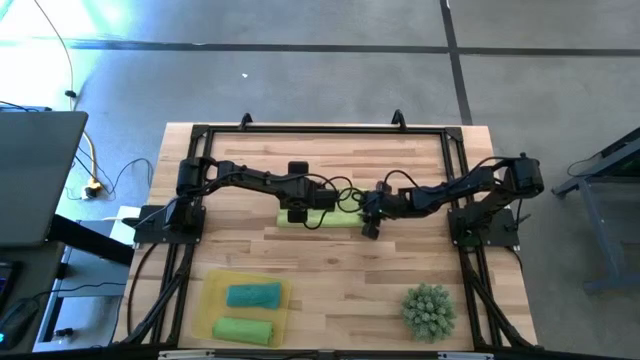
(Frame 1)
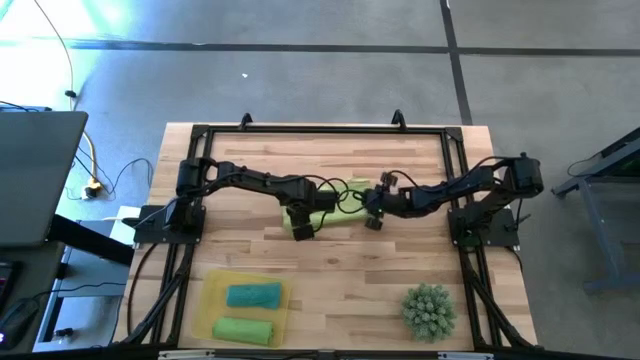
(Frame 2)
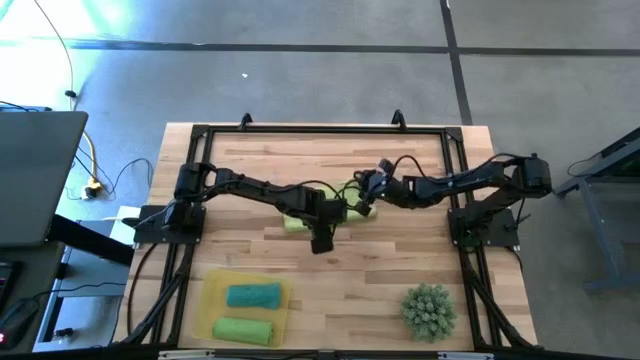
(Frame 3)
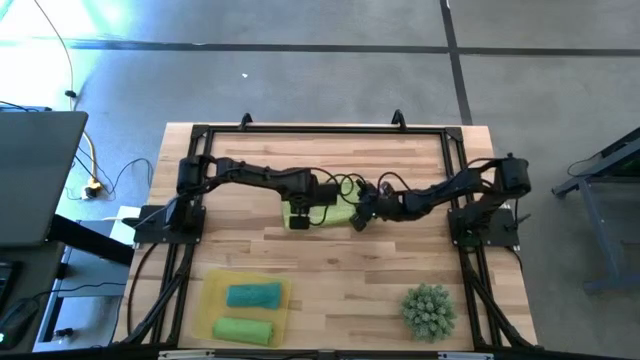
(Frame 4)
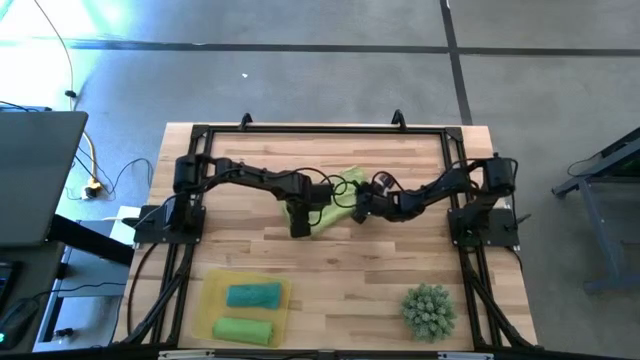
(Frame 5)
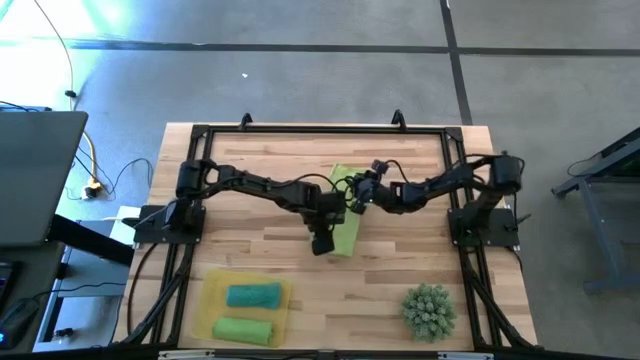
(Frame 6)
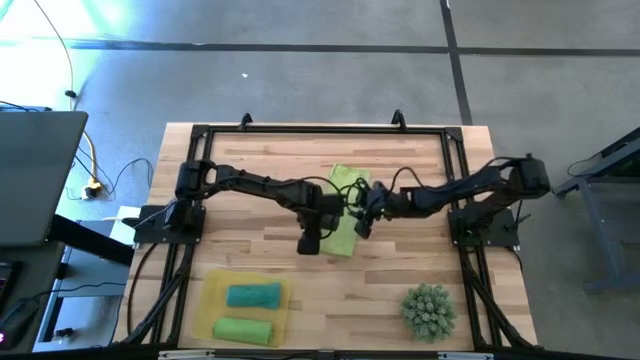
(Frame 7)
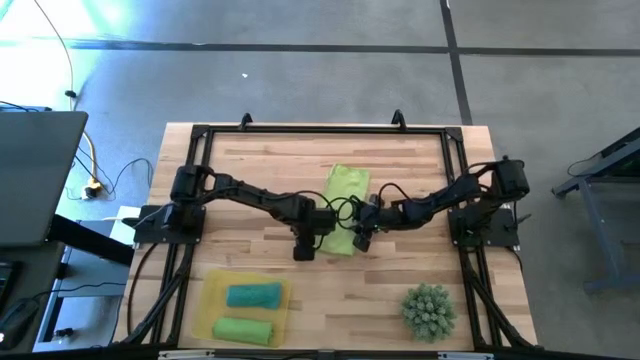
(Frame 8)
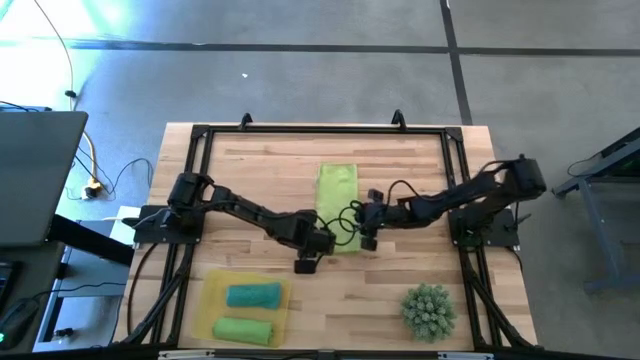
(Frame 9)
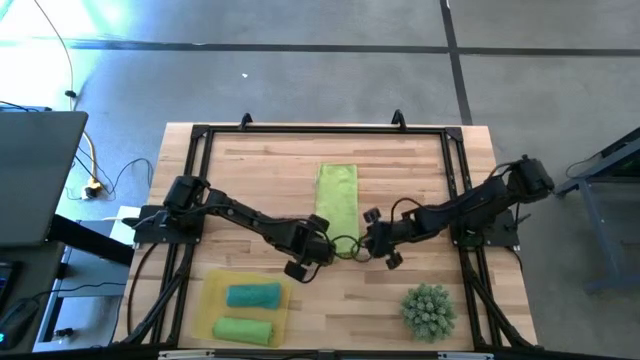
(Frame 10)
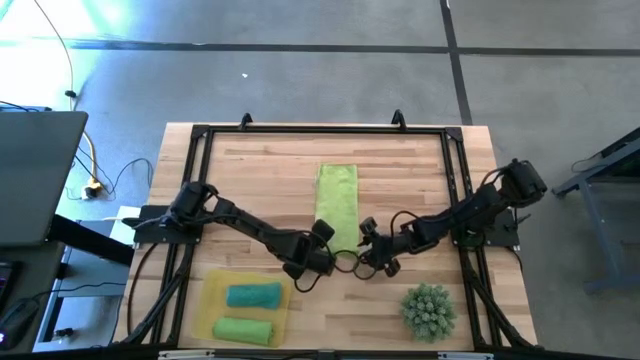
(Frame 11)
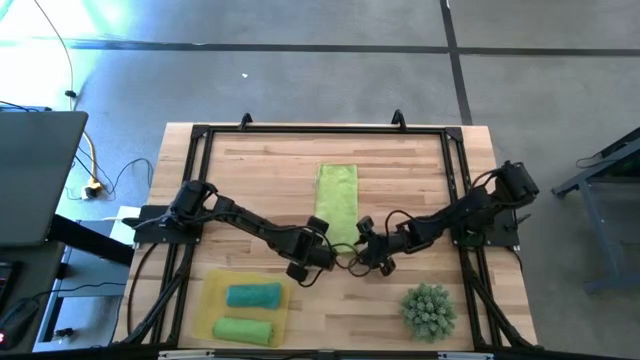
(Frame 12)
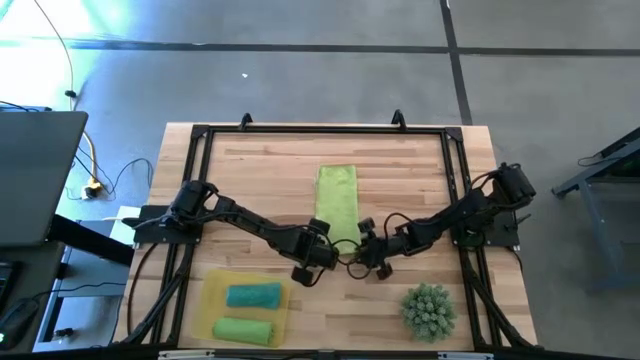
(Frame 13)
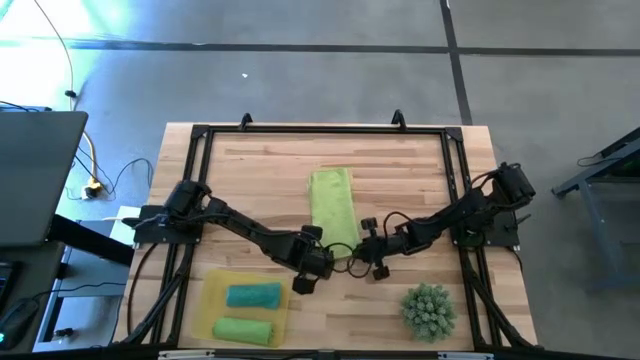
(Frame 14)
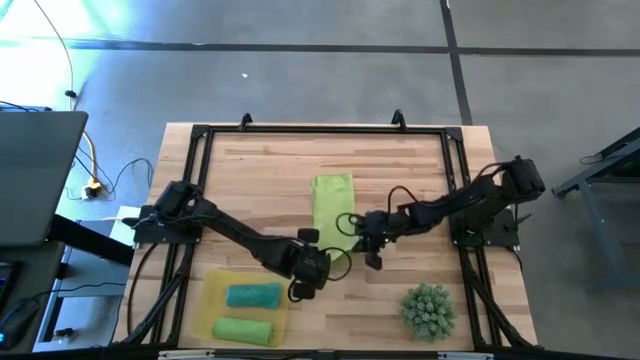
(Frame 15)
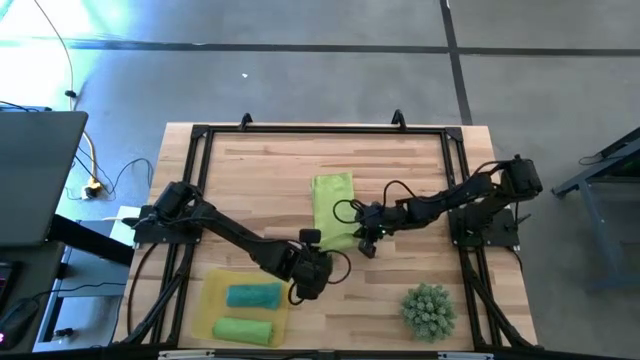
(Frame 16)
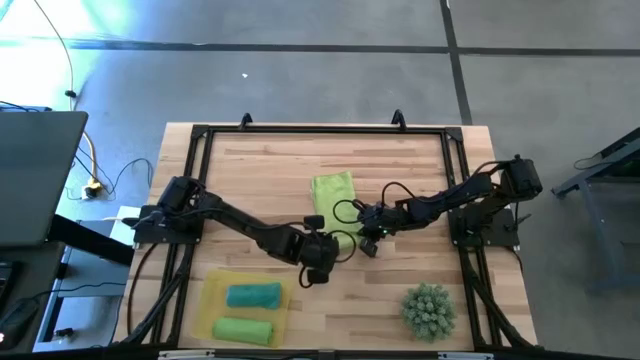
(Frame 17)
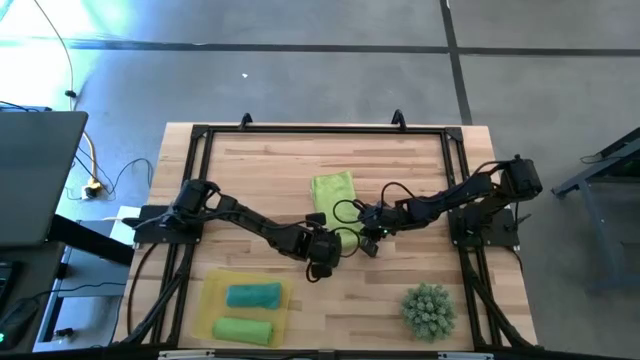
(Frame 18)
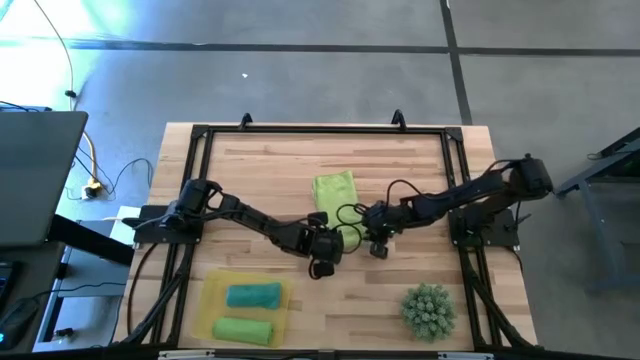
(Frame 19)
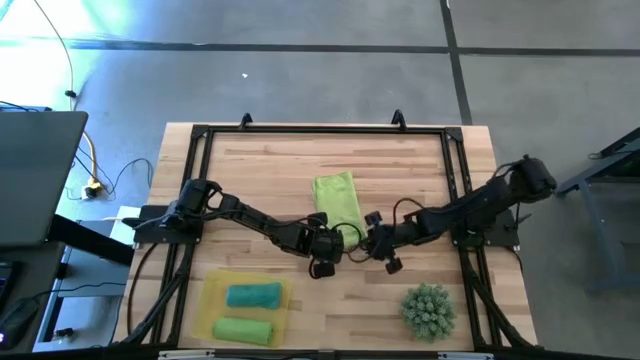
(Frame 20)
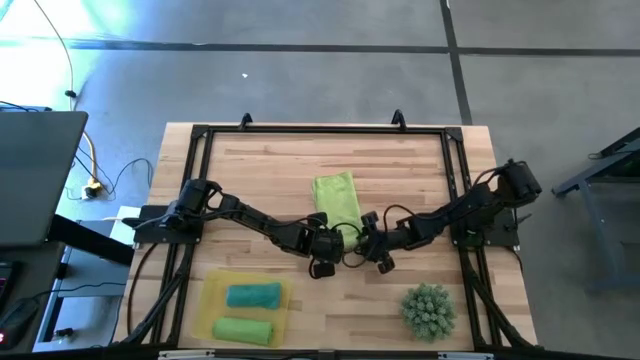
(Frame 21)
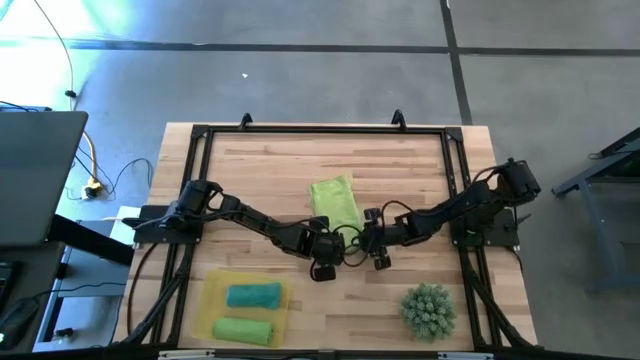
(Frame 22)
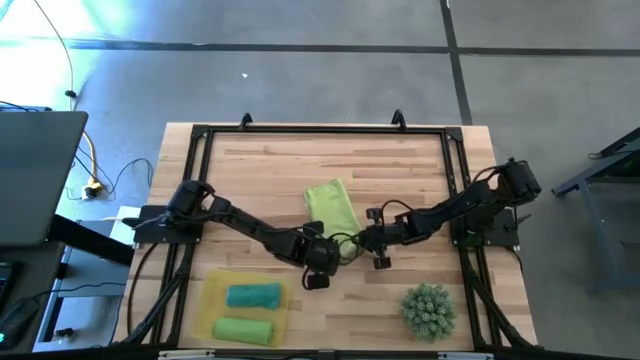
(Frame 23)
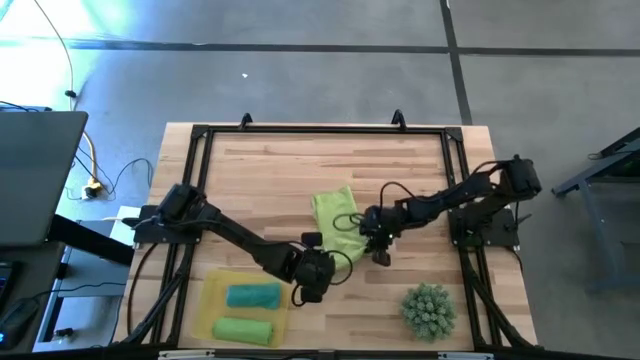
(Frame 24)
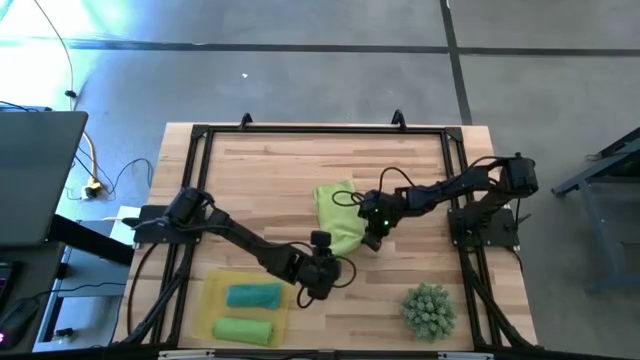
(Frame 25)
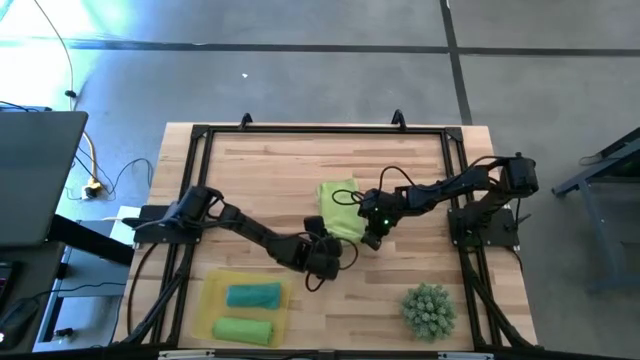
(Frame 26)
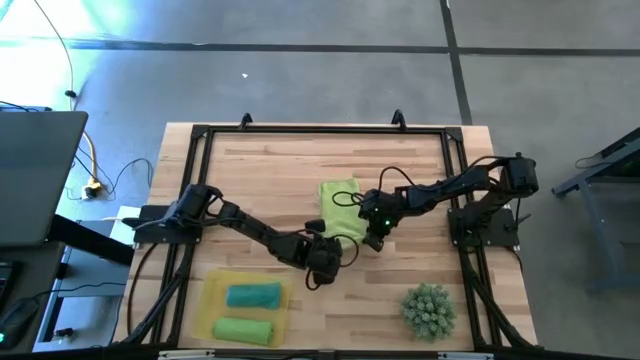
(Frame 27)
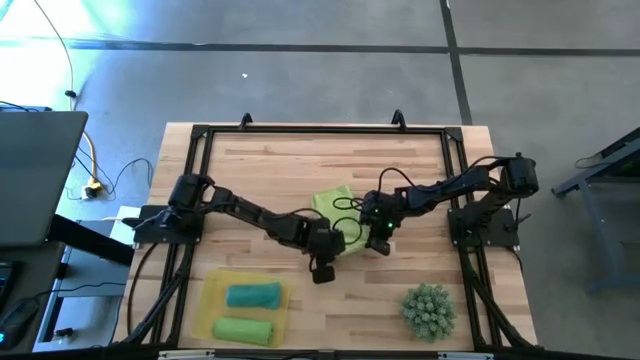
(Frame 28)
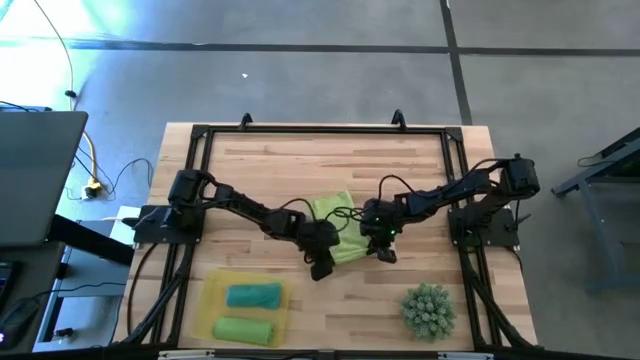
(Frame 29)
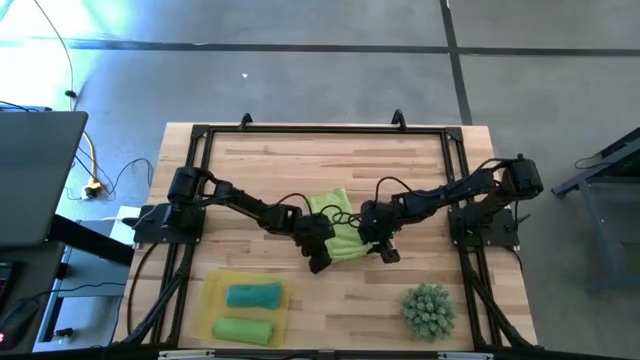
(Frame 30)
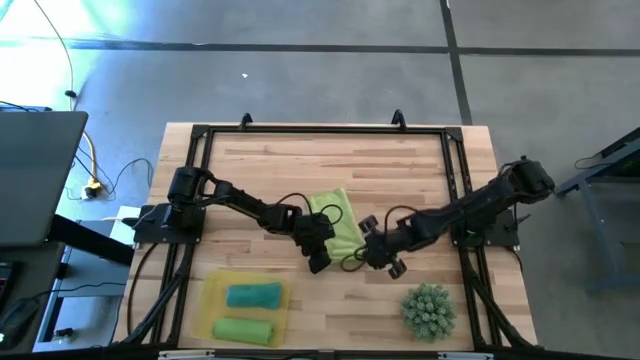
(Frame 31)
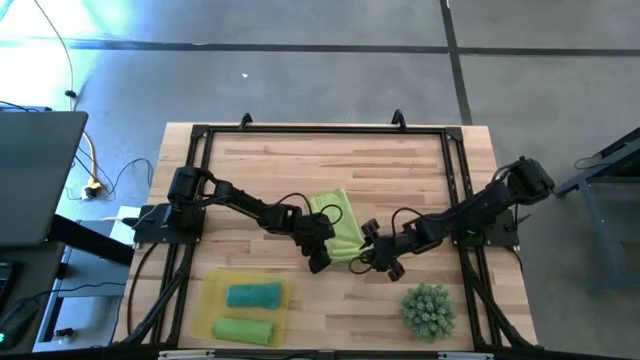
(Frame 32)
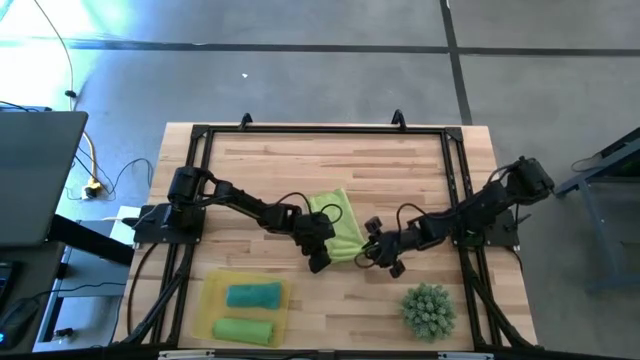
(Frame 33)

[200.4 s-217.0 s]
Task: Roll microfiber towels into tight, uniform cylinder then place into a basket
Roll the light green microfiber towel
